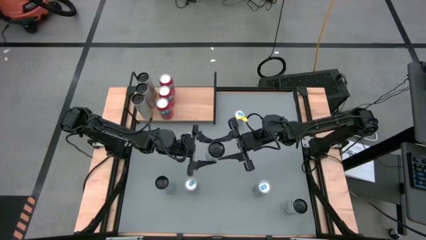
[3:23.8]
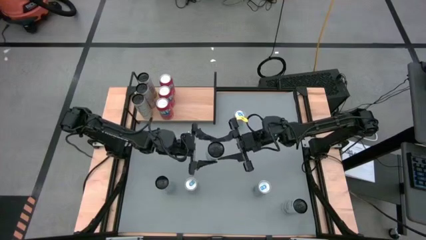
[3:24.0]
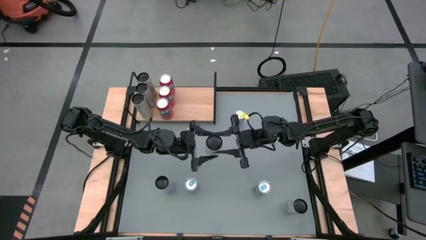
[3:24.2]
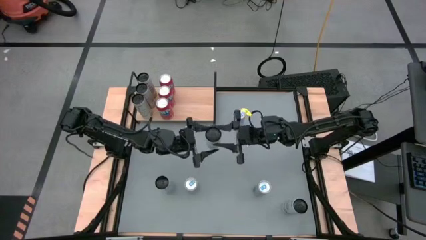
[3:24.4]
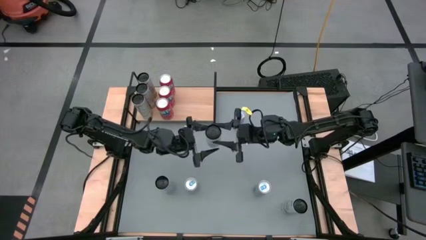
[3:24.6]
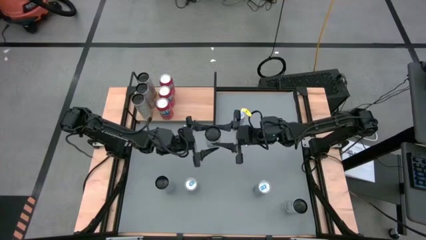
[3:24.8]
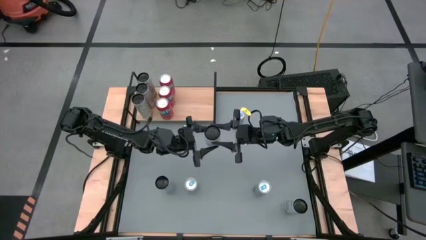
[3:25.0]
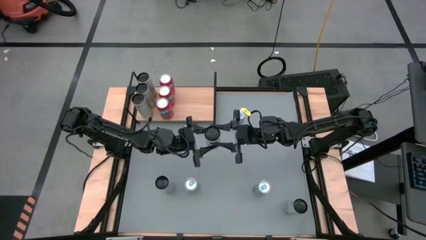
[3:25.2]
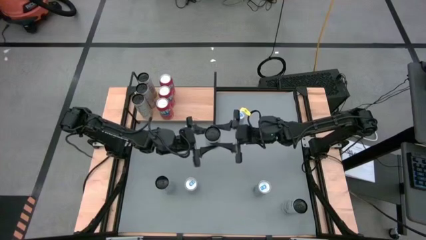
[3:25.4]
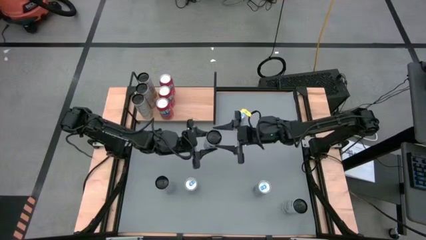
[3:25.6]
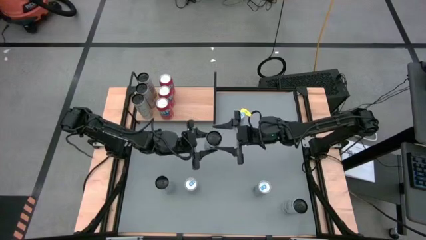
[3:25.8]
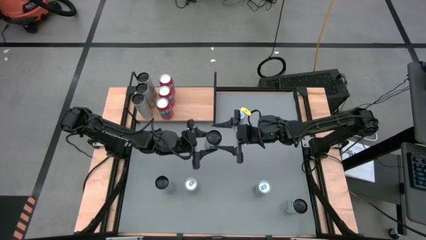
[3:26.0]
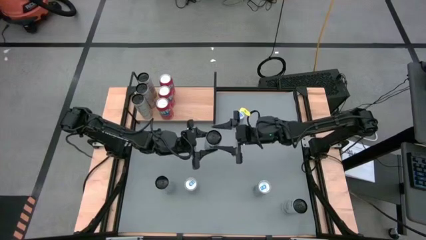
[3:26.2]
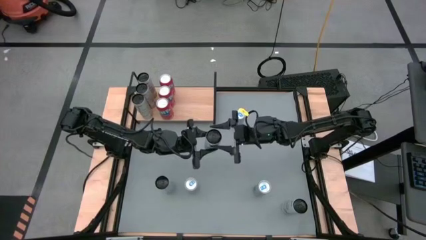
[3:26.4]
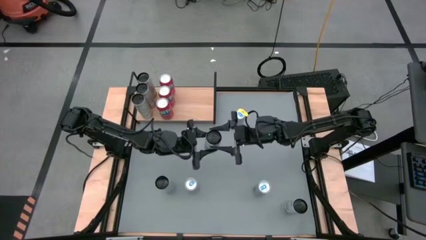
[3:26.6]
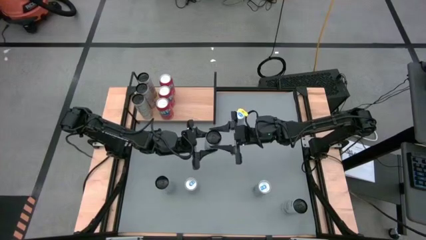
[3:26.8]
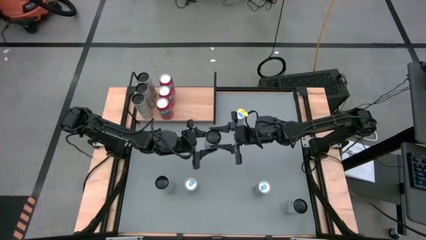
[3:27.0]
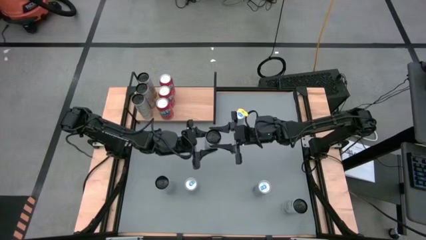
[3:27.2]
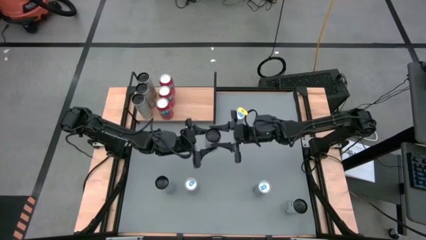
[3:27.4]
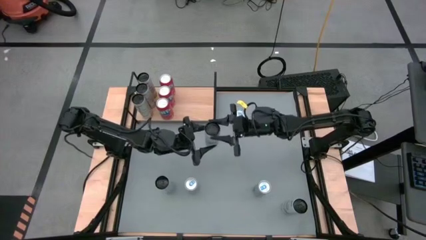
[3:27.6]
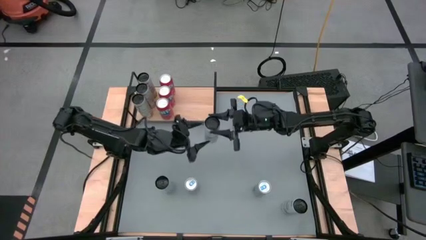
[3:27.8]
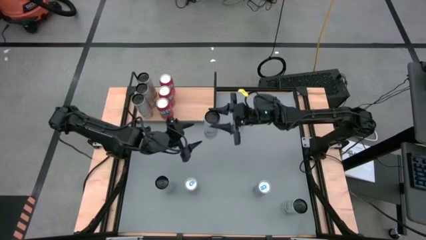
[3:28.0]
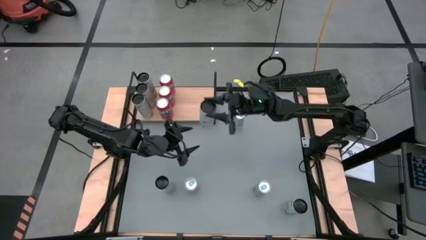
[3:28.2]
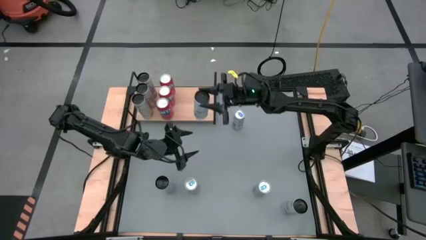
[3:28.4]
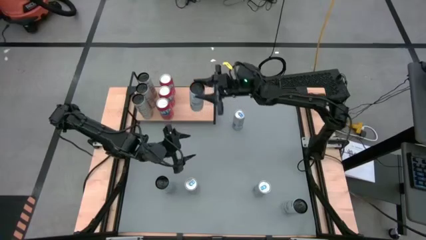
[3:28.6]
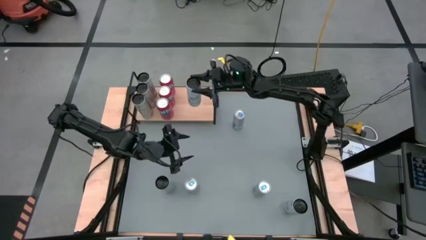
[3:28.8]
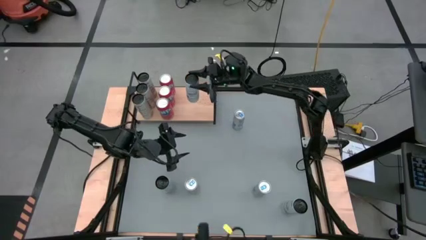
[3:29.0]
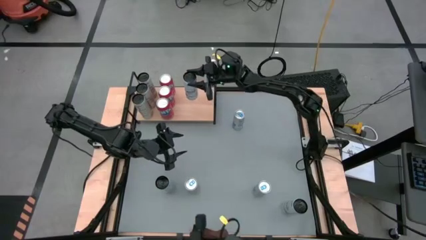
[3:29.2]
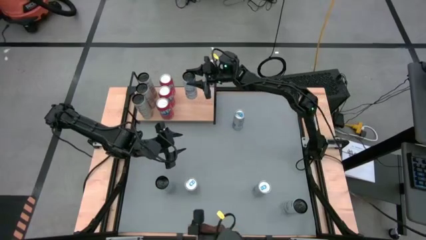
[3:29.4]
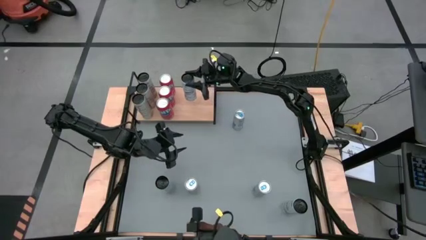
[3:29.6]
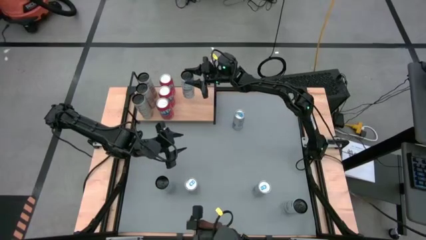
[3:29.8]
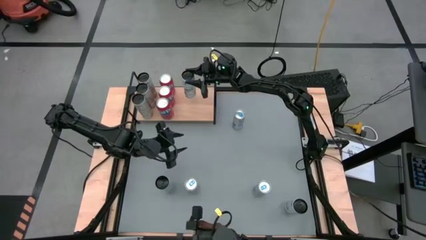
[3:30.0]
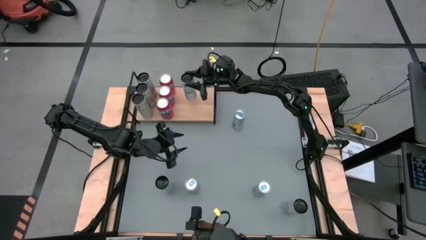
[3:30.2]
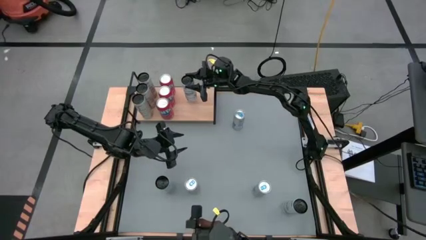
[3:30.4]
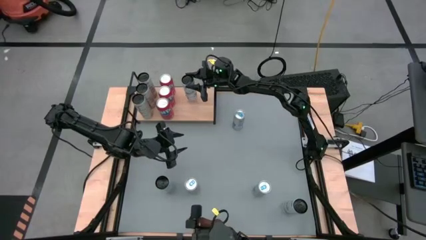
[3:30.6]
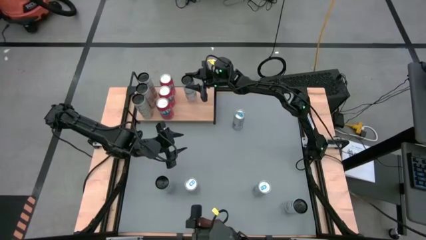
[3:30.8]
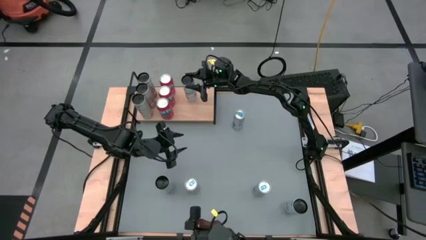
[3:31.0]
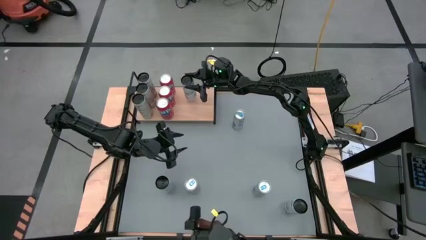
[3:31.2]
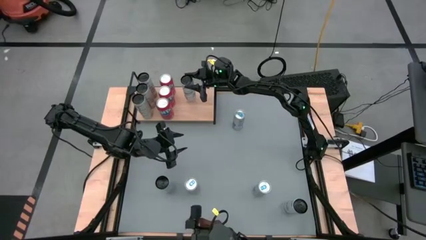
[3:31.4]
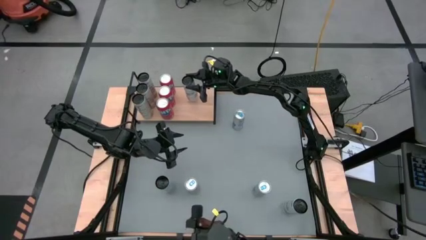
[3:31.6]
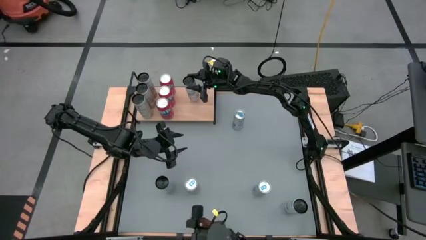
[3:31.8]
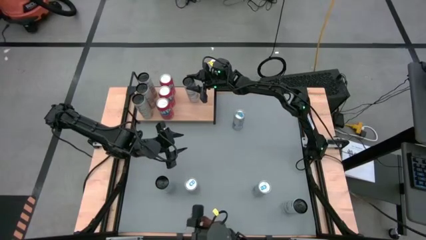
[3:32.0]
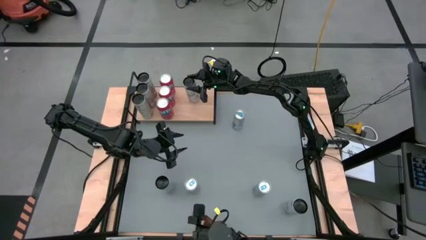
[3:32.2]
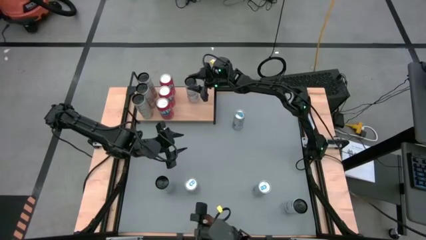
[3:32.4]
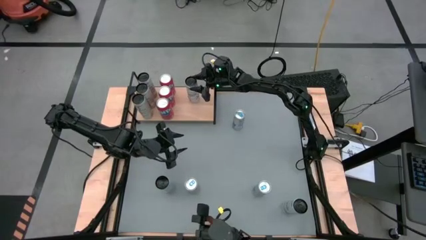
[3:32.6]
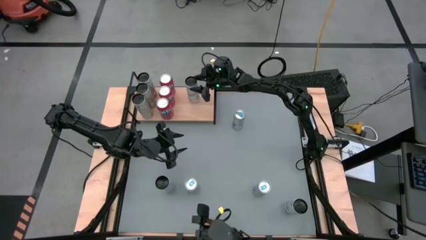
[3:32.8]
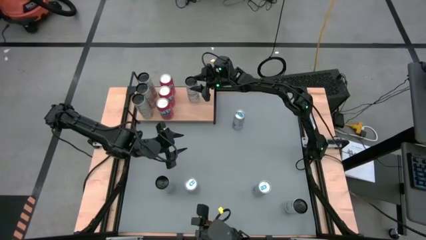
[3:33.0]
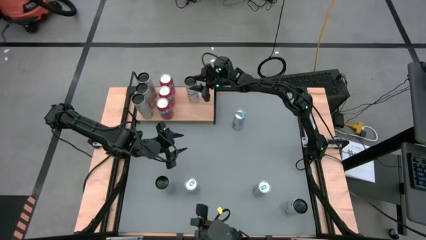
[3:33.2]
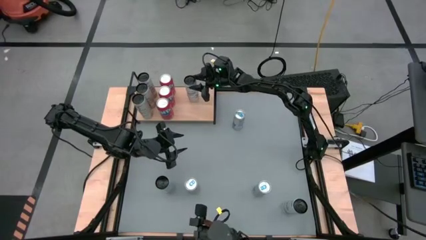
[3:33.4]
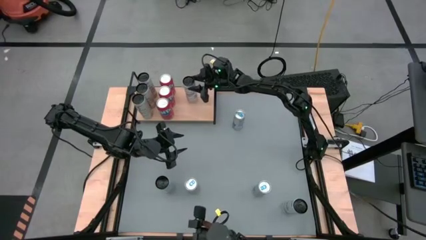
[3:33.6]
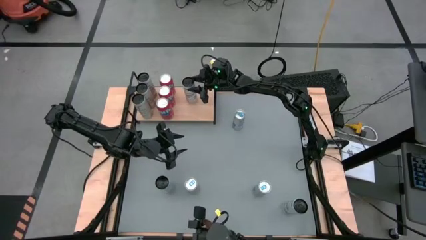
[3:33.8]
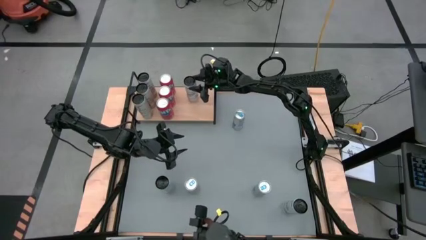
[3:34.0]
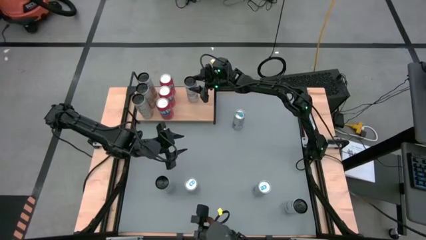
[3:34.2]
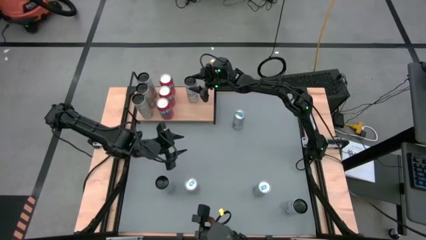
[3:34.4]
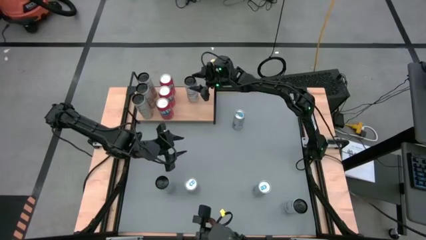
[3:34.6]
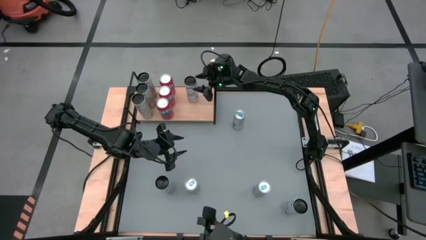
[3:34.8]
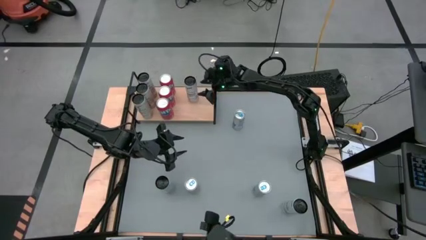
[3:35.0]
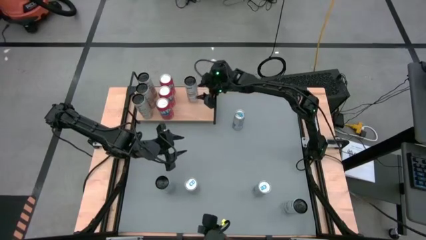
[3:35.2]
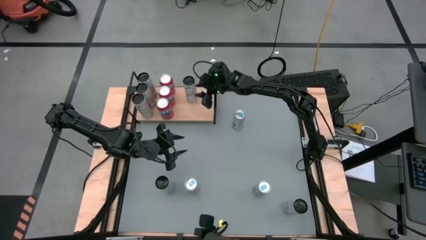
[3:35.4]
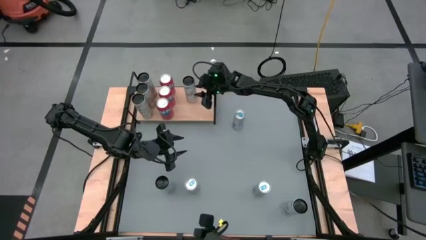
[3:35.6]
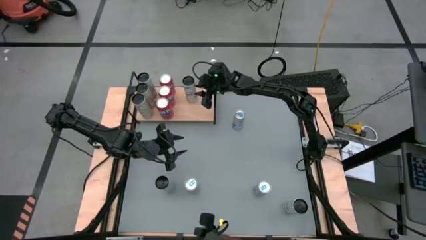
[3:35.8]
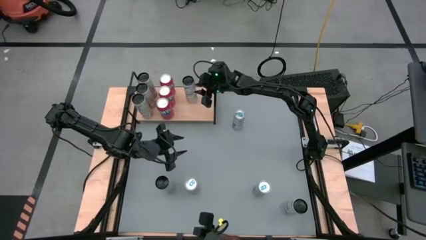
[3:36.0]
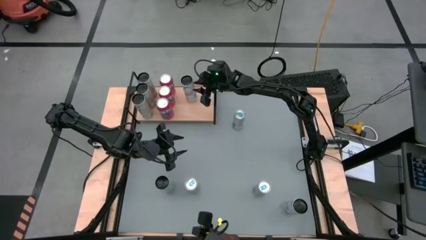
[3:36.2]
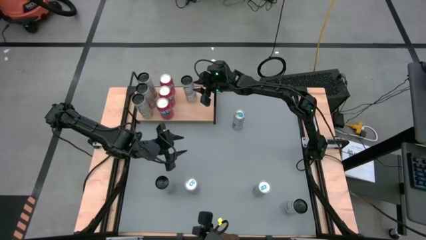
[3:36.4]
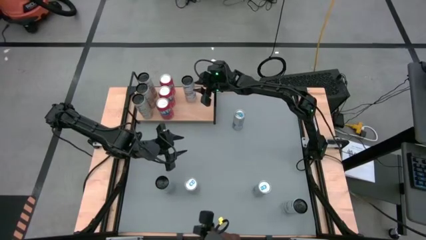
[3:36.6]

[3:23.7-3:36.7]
Task: Place canned beverage on shelf
Put the top white-blue soda can on the shelf
